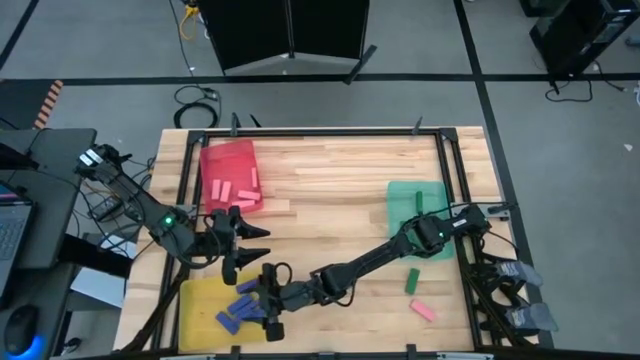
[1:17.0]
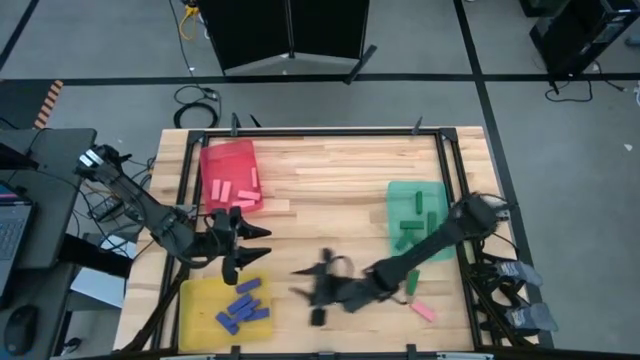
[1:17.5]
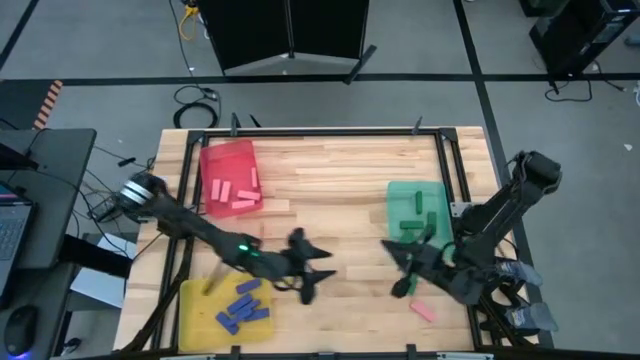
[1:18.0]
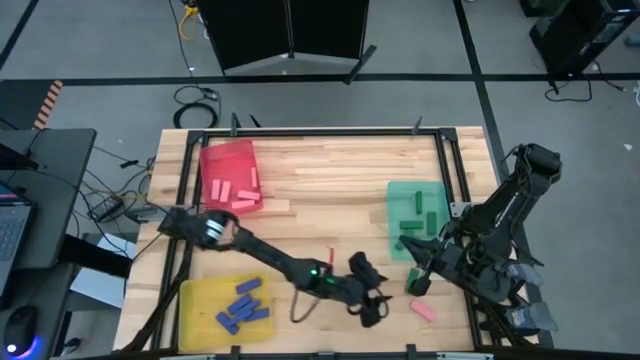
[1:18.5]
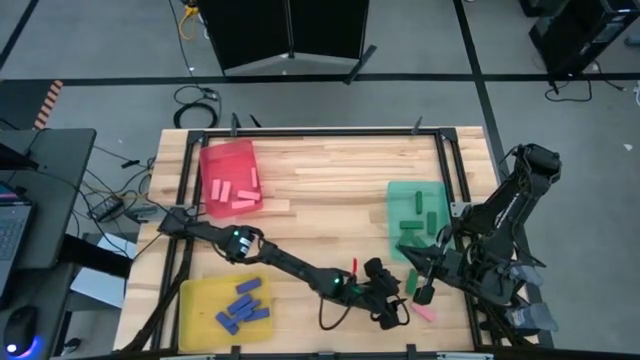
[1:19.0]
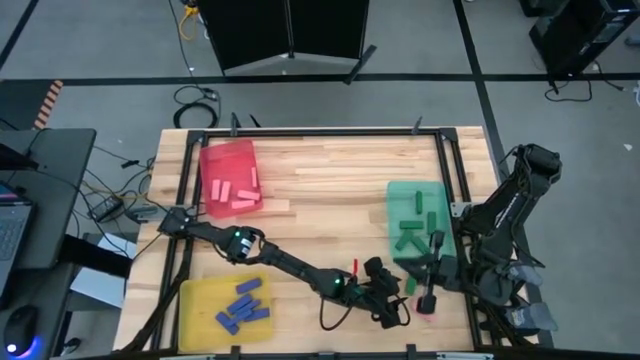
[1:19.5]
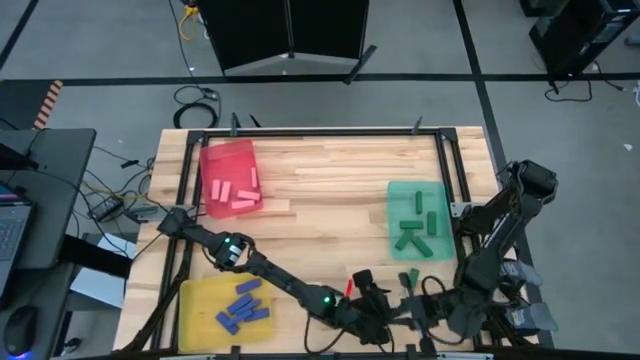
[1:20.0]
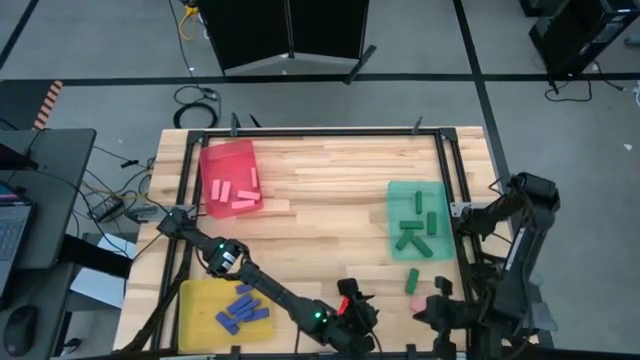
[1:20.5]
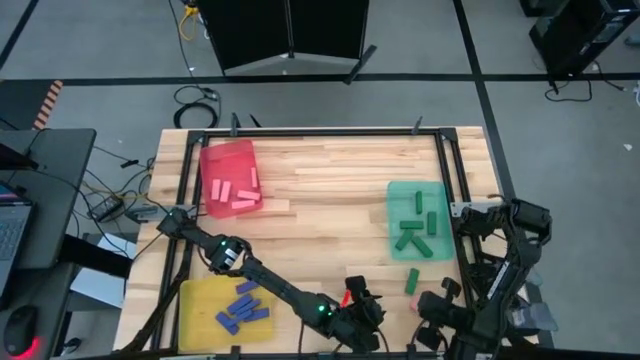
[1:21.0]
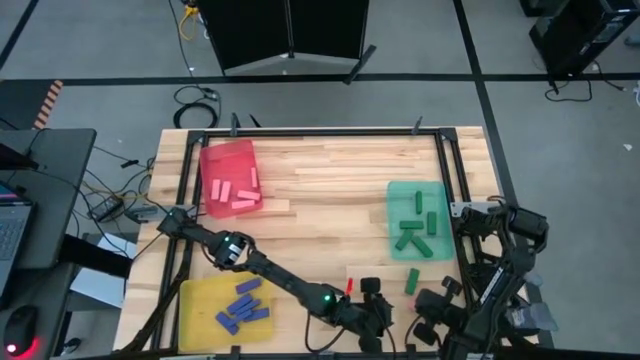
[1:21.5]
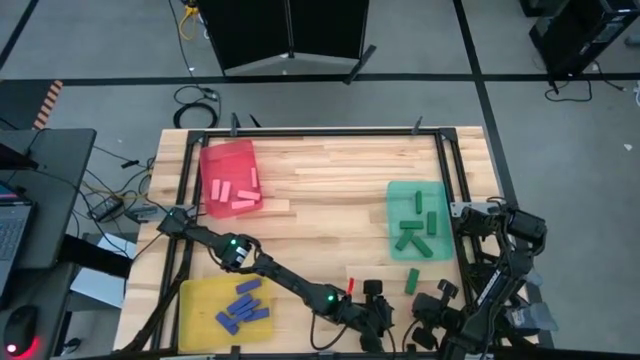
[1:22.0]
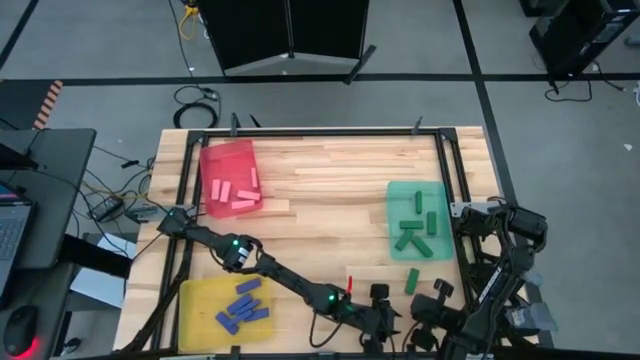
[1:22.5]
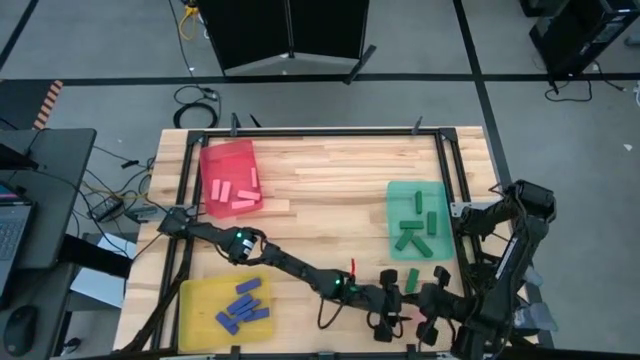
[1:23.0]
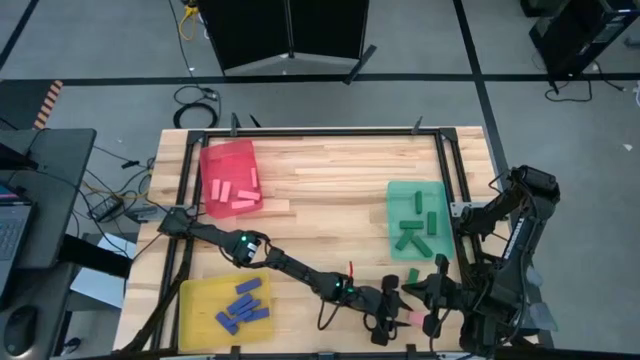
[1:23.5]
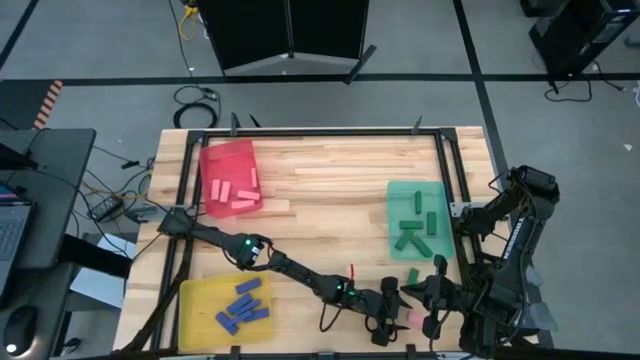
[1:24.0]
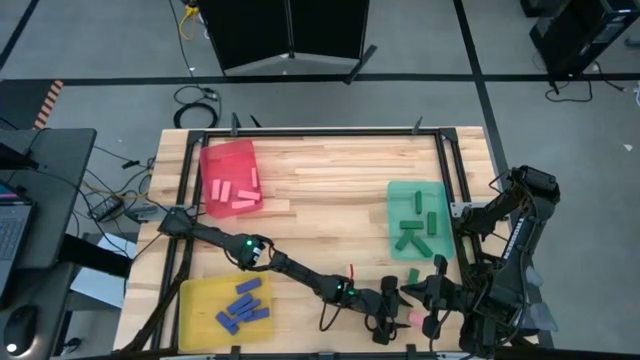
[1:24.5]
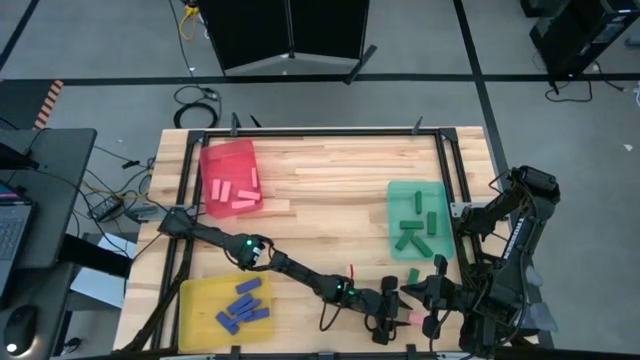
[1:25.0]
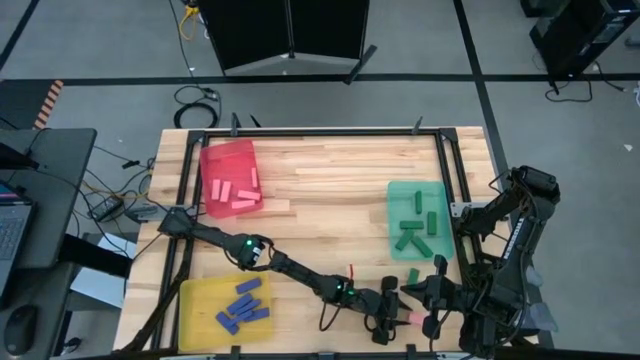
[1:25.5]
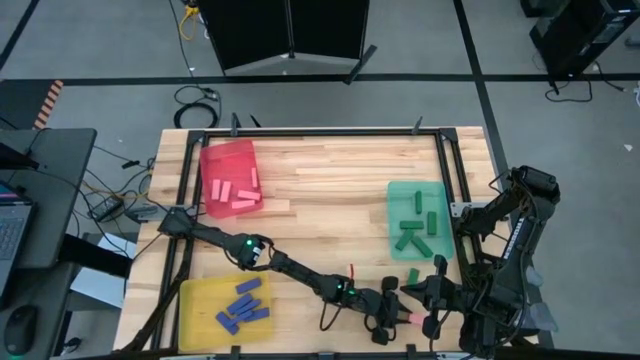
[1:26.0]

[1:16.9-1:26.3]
Task: Sort blocks
Put the pink block into the red bin

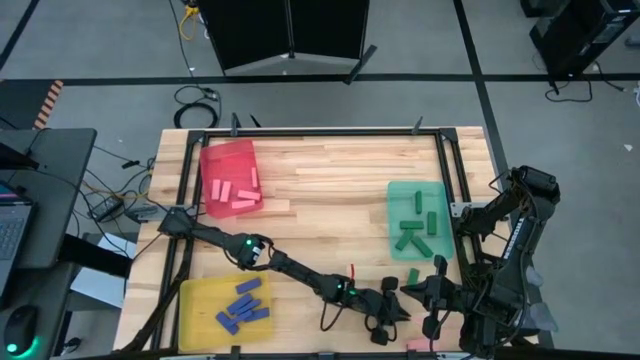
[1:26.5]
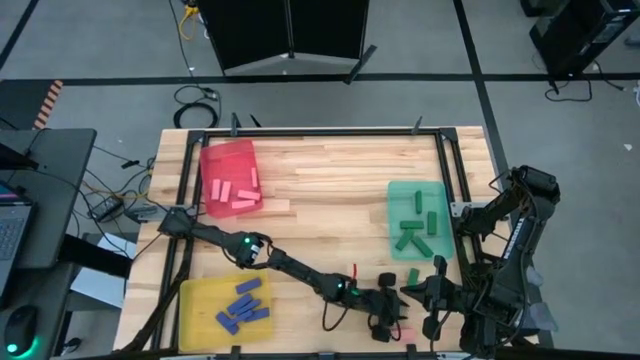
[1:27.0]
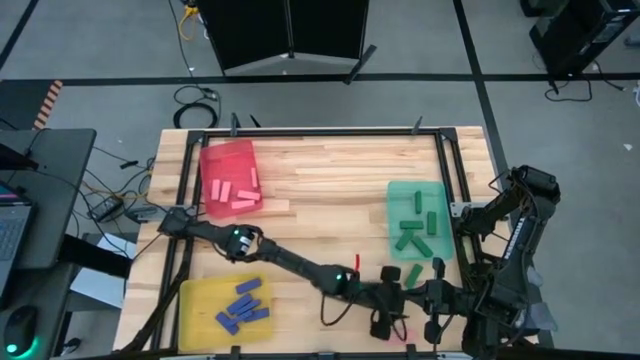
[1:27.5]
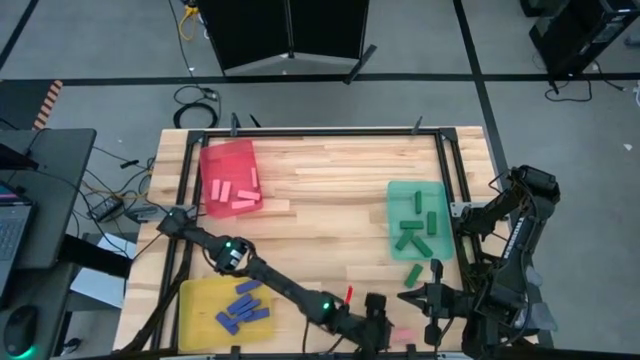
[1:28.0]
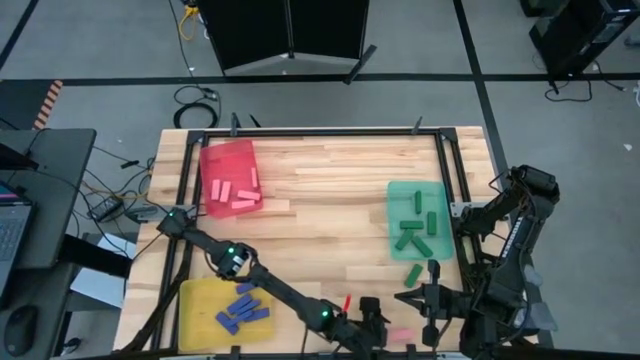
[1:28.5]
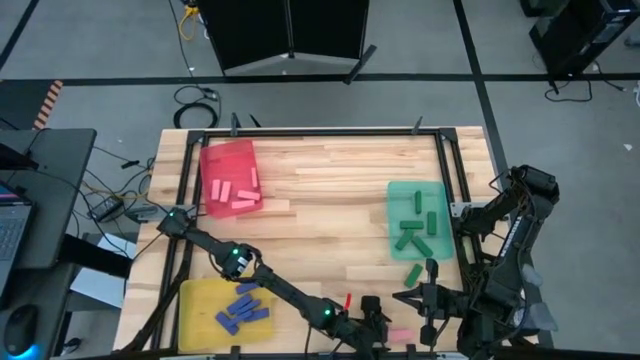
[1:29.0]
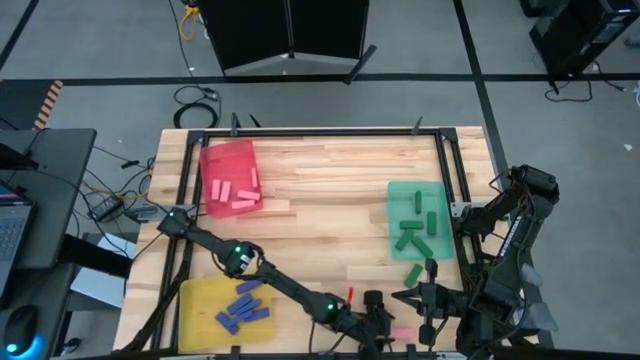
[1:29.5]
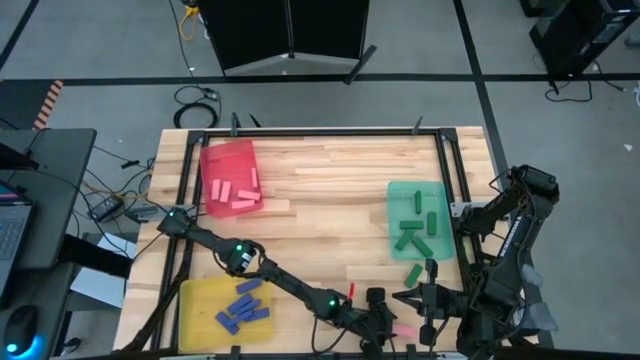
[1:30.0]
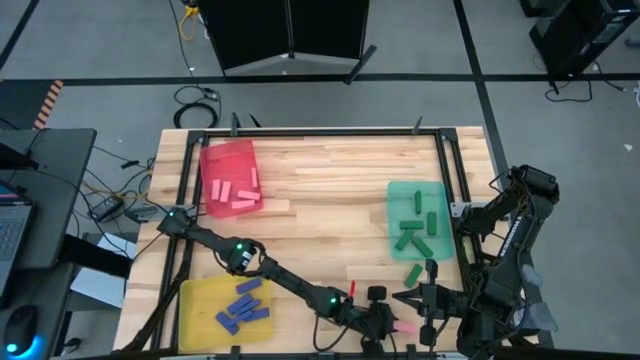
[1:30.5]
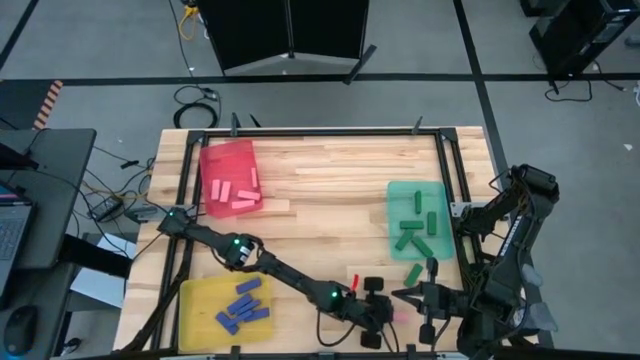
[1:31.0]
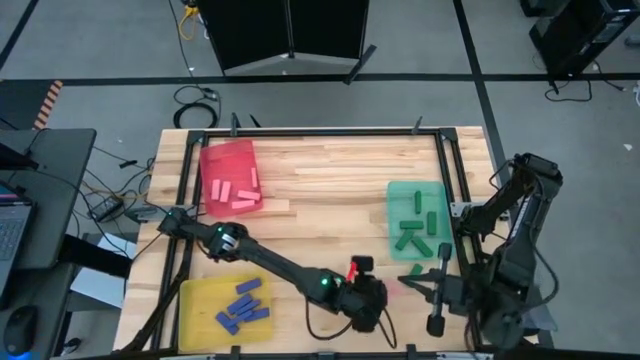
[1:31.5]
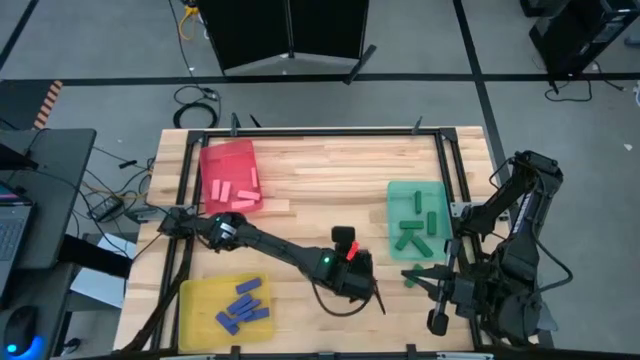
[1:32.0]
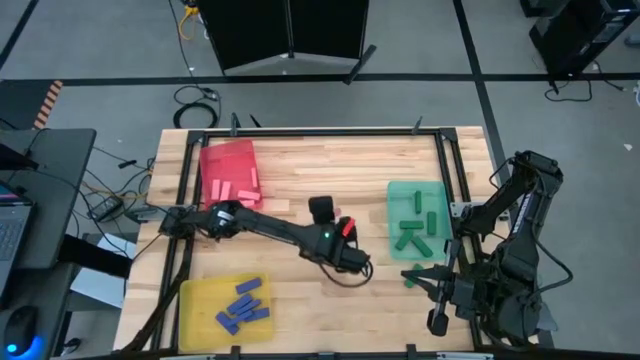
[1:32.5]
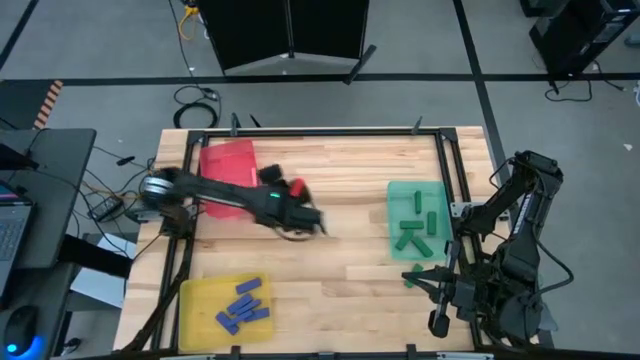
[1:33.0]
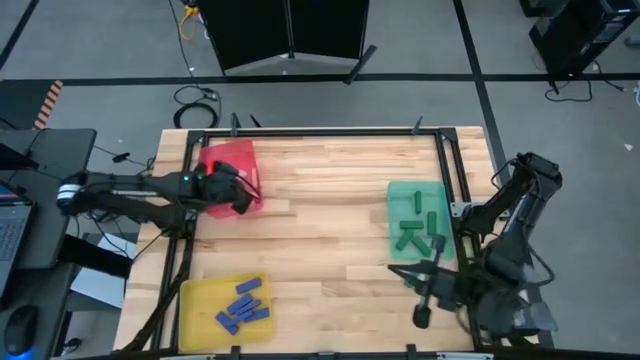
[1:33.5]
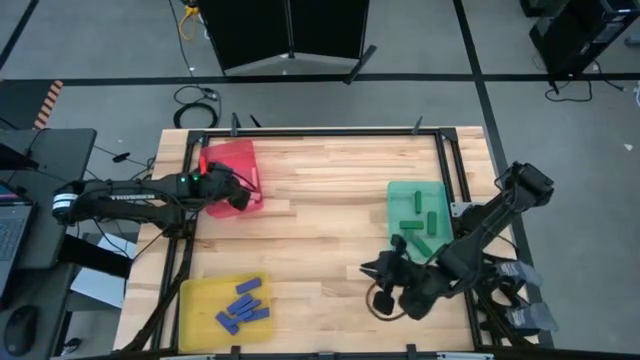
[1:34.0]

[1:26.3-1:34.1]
Put the pink block into the red bin

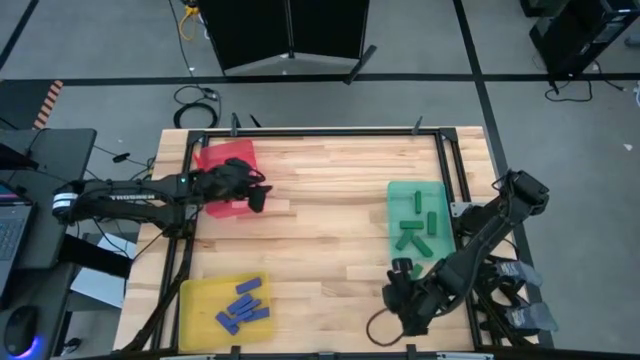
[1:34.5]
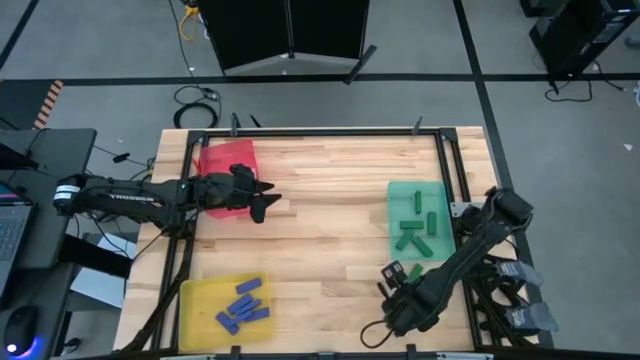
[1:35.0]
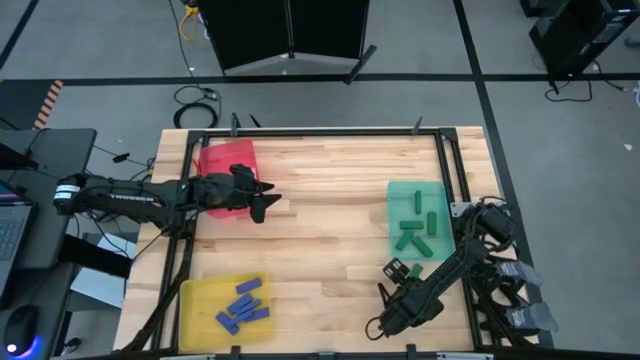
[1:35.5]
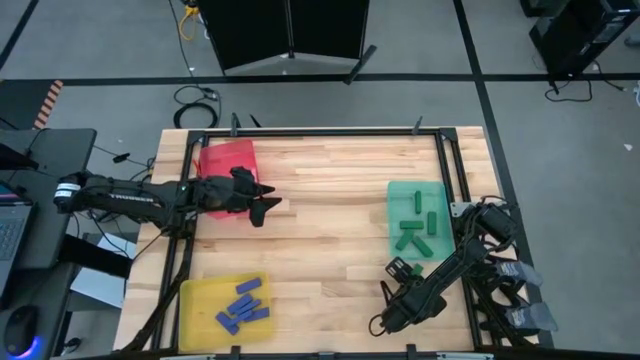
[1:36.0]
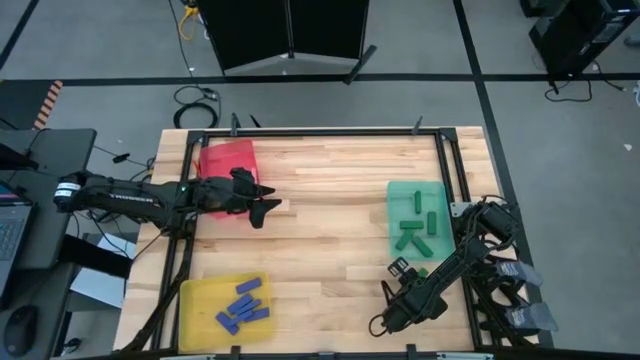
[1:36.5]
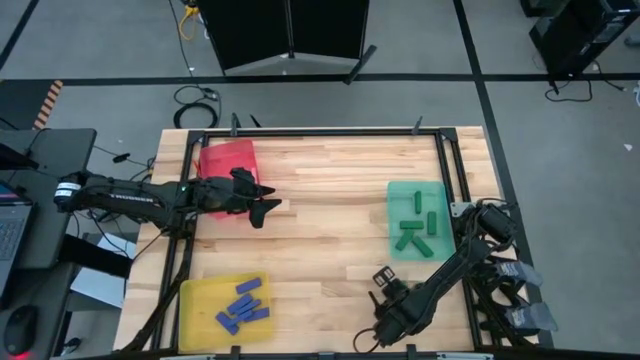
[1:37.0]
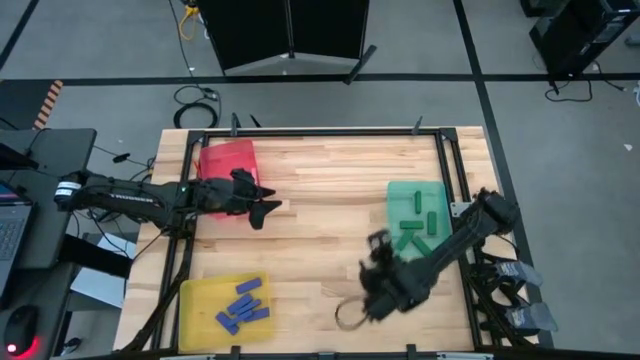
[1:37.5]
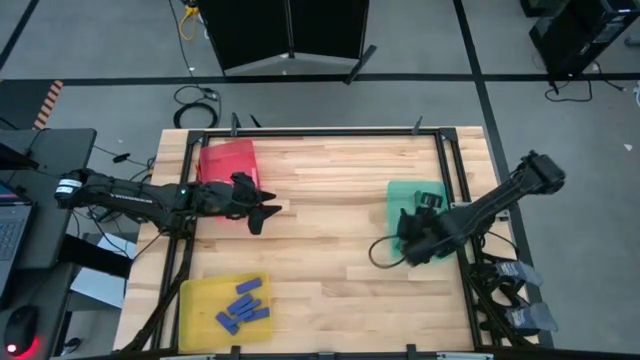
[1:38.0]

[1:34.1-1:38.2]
Put the green block into the blue bin
